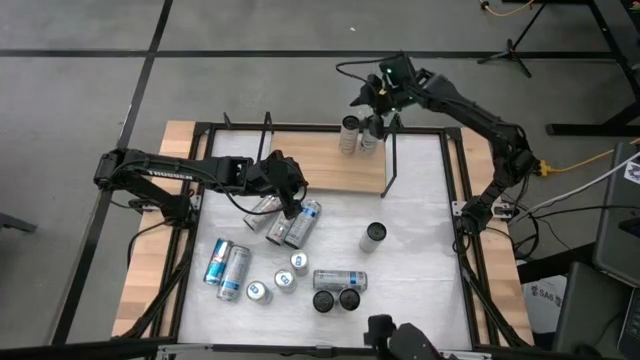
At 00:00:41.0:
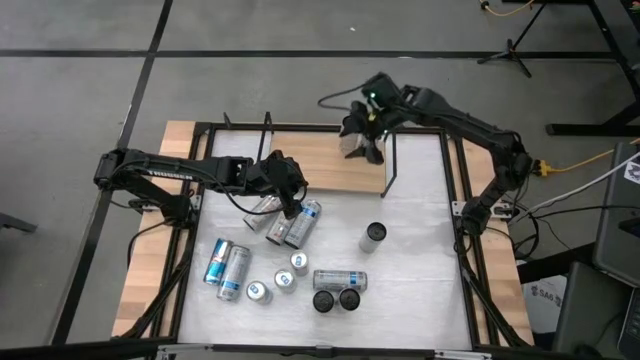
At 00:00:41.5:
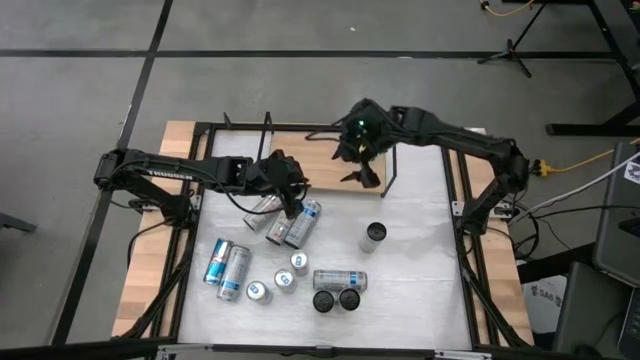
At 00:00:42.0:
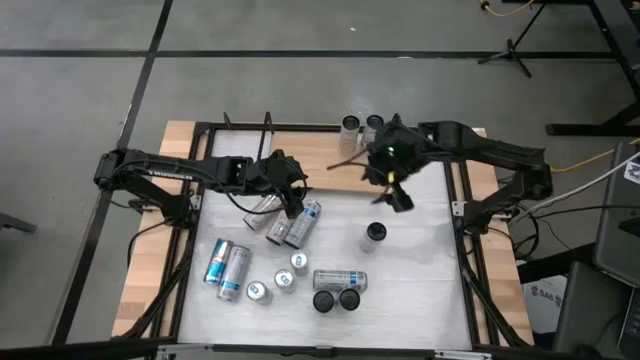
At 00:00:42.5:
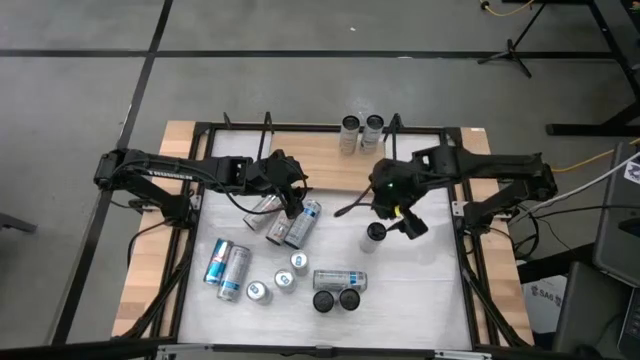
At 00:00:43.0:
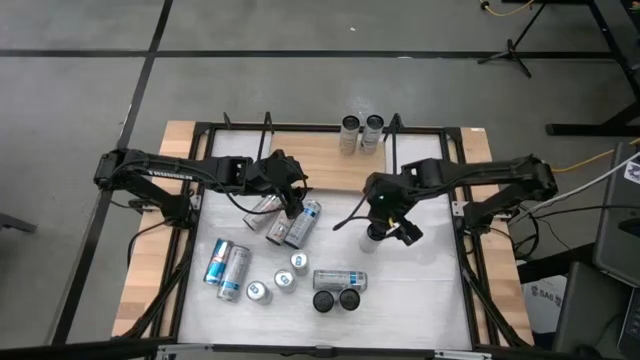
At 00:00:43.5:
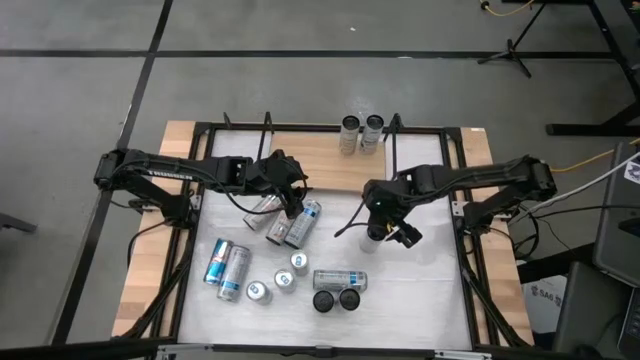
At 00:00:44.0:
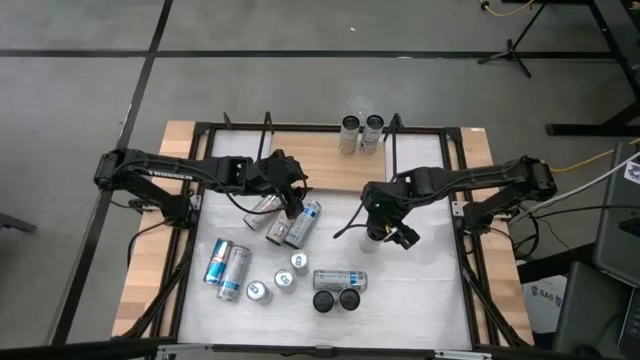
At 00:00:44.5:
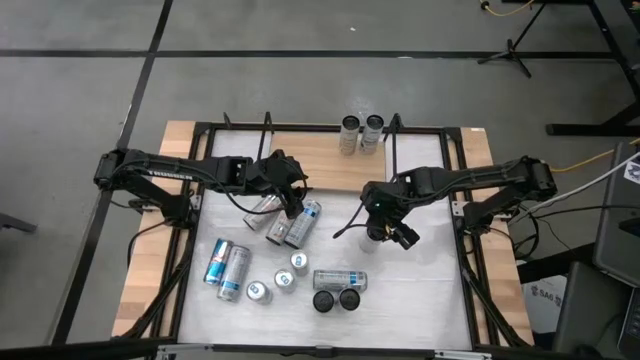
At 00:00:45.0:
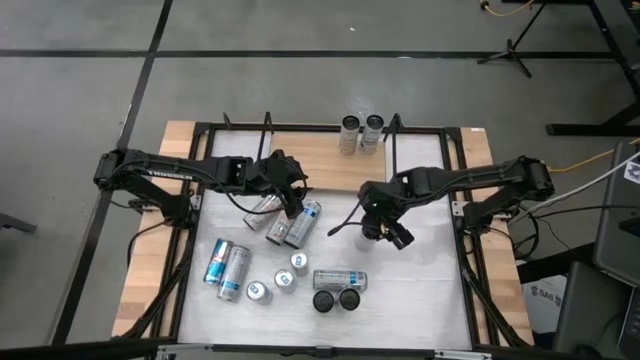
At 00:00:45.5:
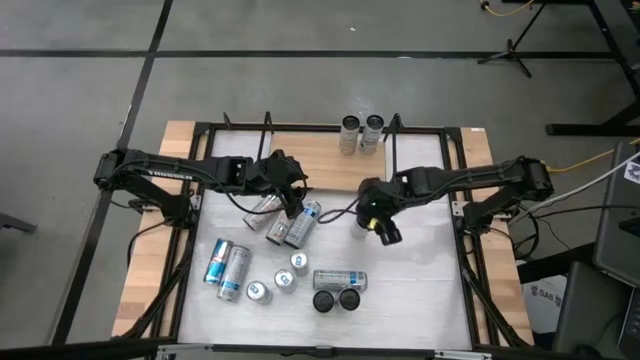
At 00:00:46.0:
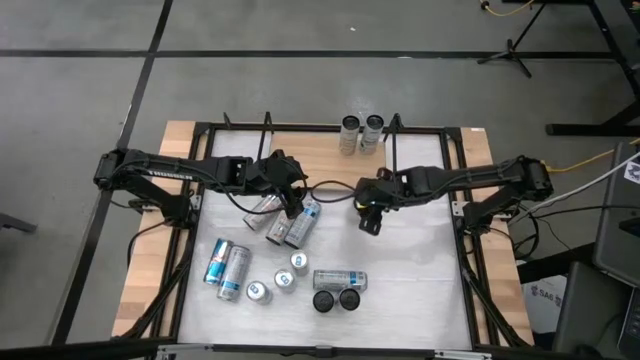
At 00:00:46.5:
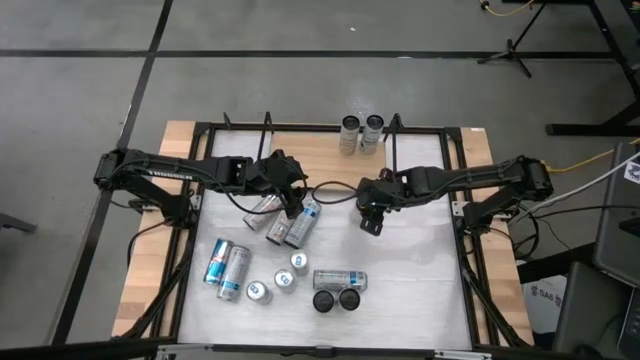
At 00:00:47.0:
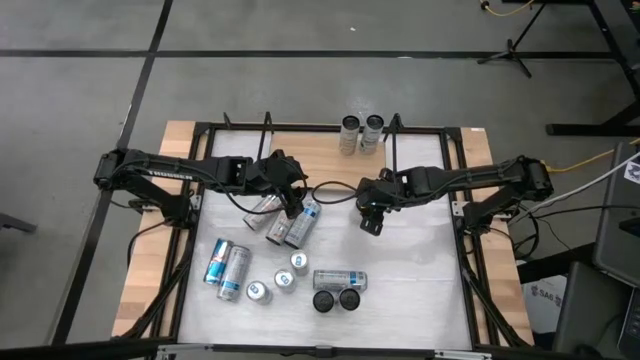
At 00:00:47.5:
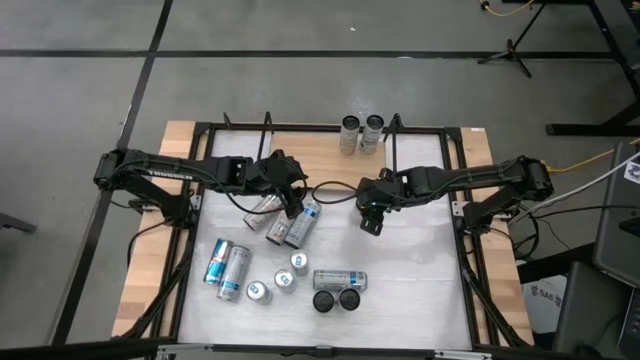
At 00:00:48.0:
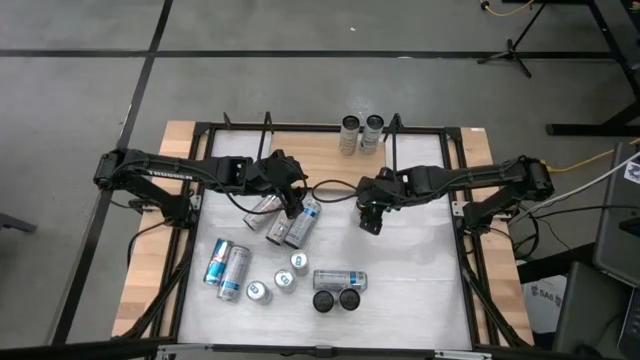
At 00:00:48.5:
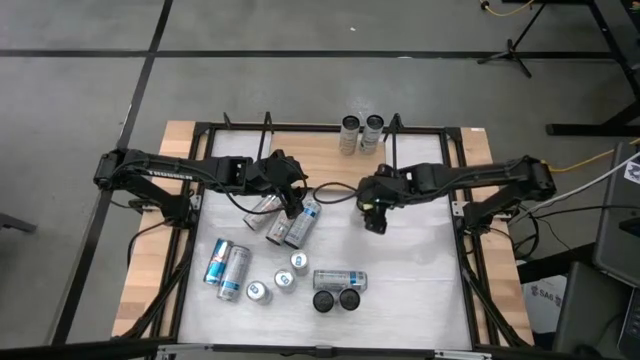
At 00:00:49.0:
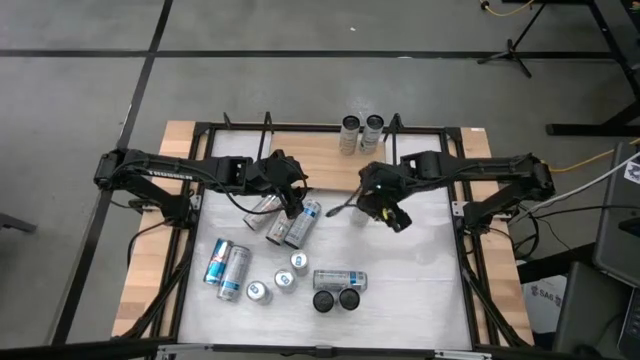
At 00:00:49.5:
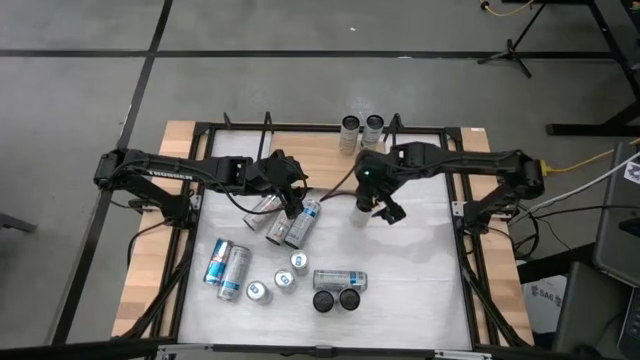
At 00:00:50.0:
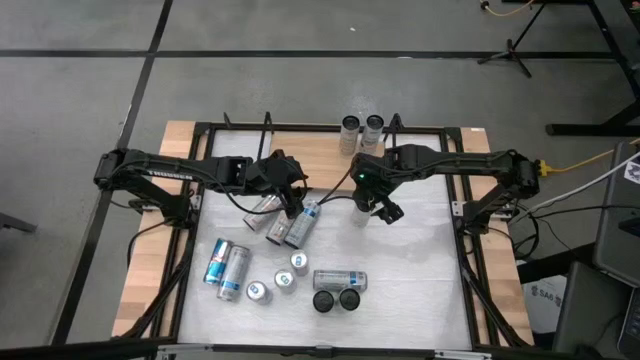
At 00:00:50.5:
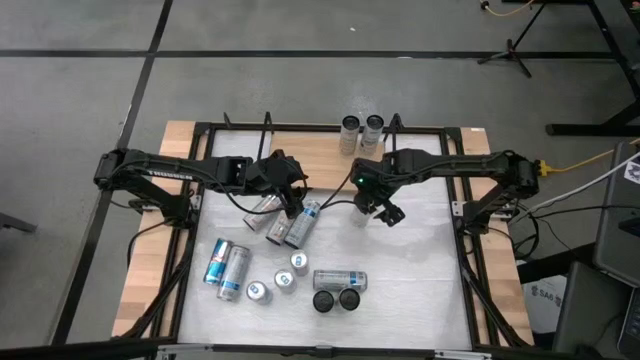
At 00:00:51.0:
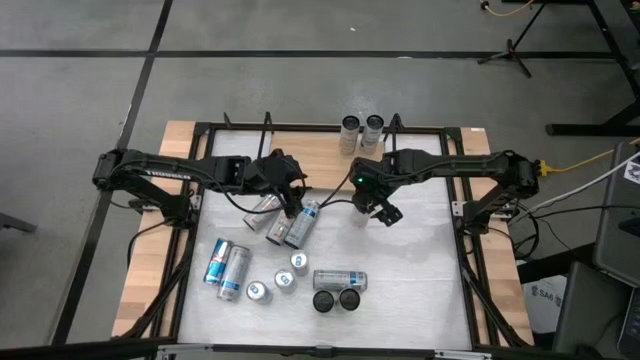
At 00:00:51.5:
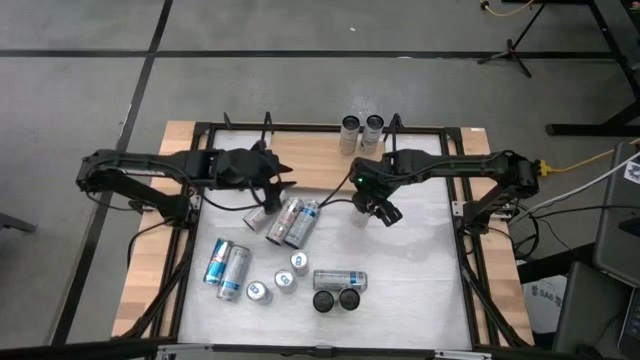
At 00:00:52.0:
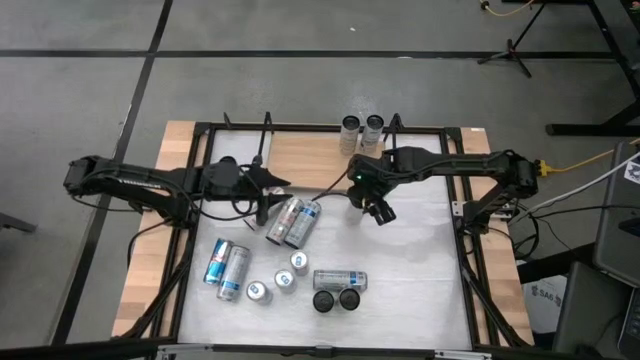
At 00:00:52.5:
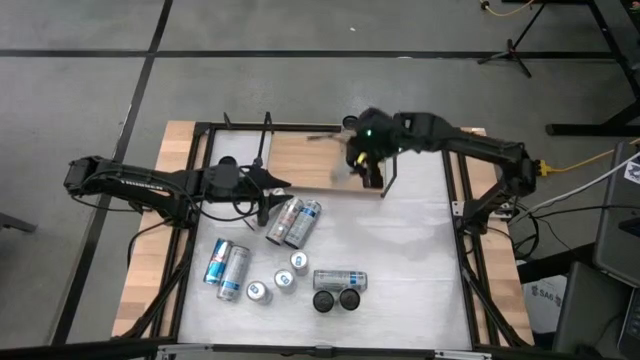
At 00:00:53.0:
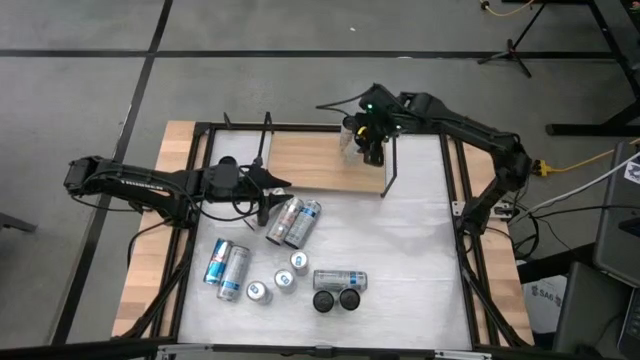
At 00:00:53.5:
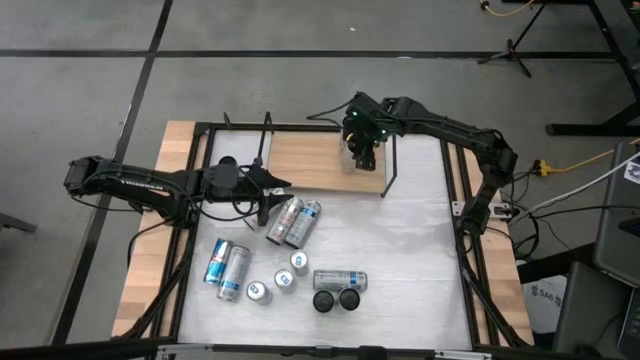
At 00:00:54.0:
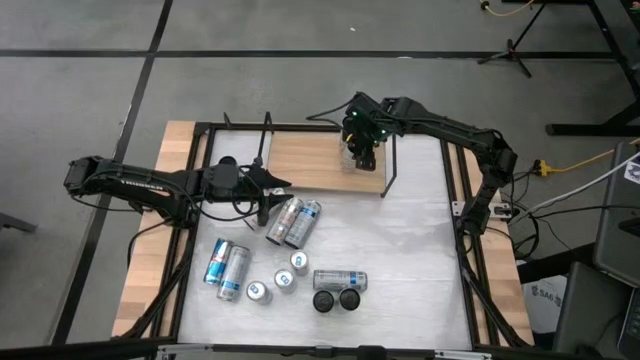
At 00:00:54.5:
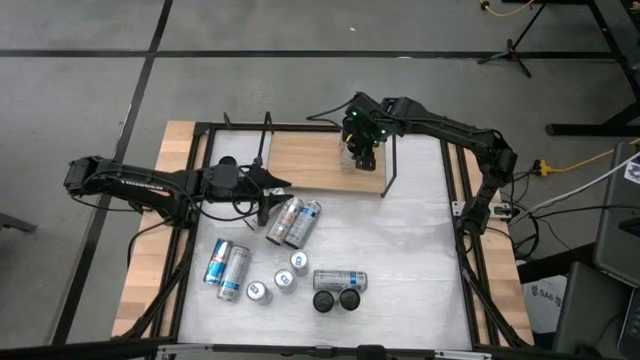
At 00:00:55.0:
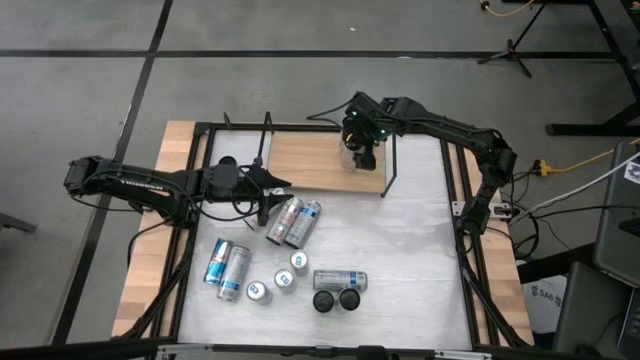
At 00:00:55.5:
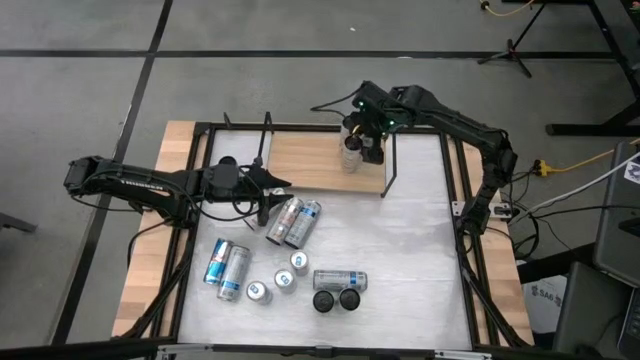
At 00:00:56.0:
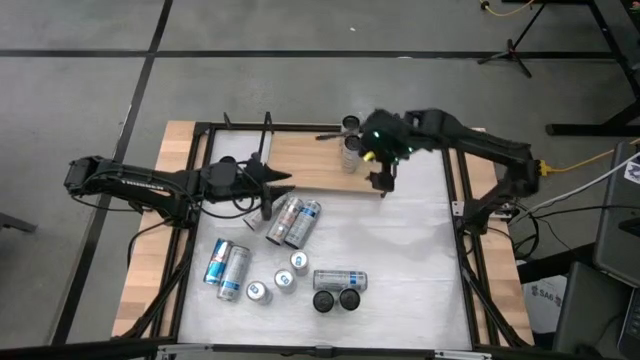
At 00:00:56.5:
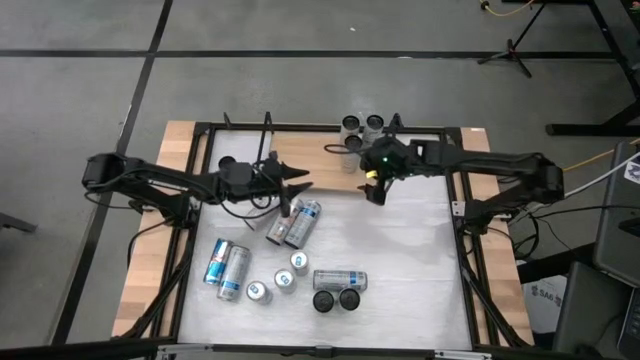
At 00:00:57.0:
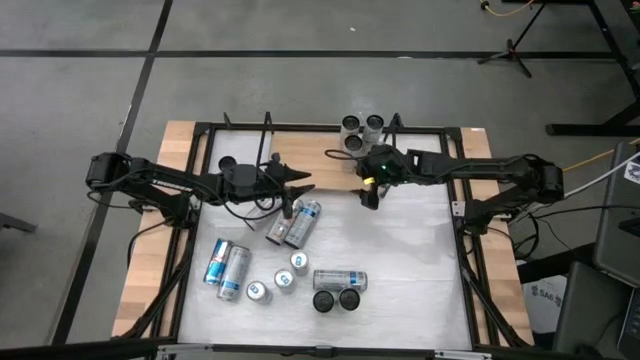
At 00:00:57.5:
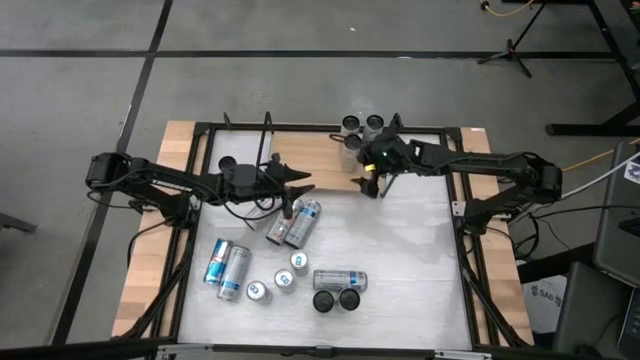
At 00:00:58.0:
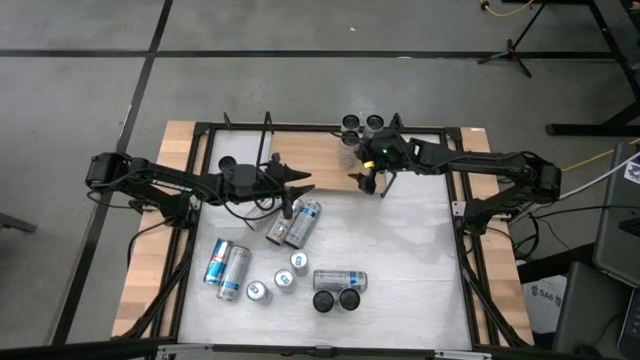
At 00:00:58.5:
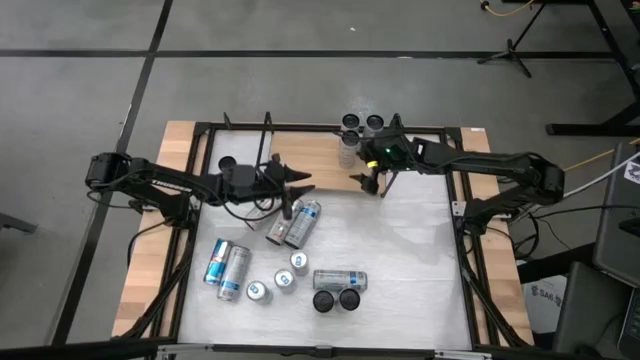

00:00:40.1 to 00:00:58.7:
Task: Place canned beverage on shelf
Put the white soda can aligned with the other white soda can on the shelf

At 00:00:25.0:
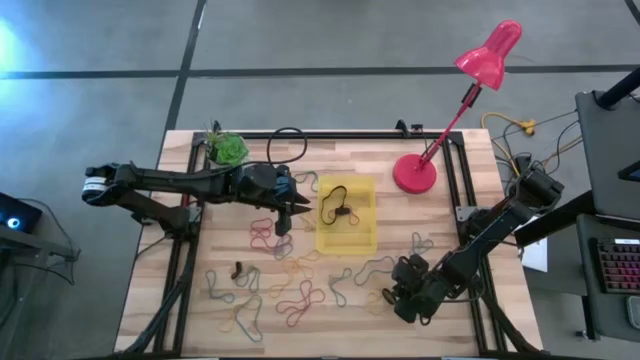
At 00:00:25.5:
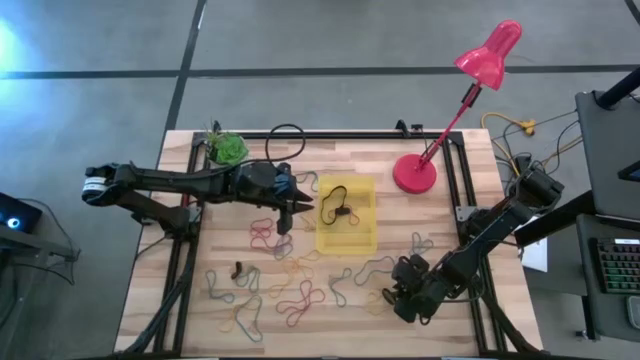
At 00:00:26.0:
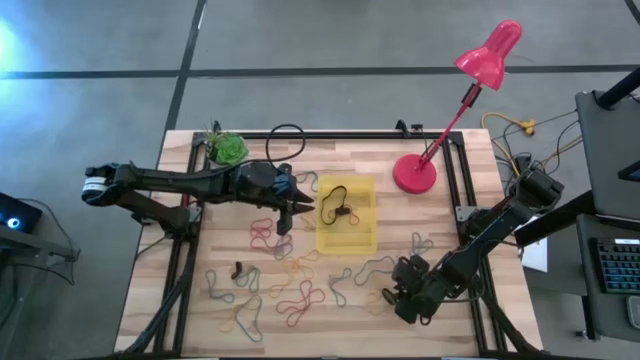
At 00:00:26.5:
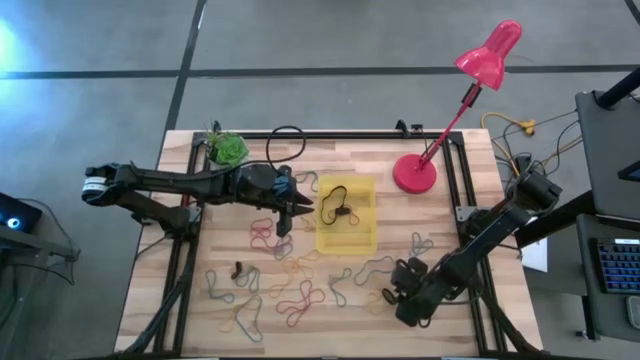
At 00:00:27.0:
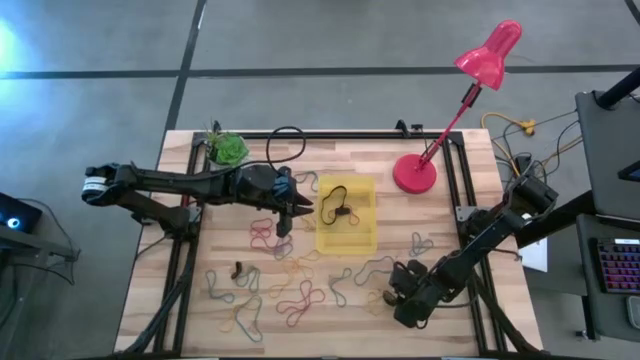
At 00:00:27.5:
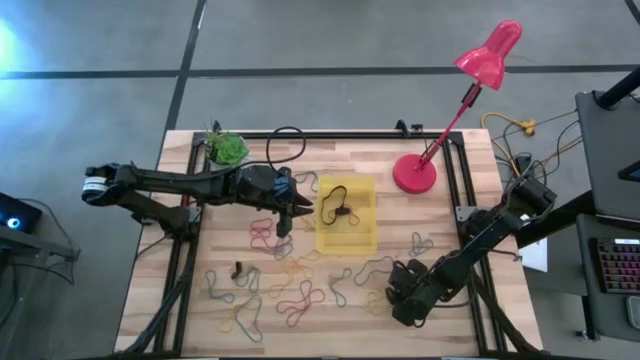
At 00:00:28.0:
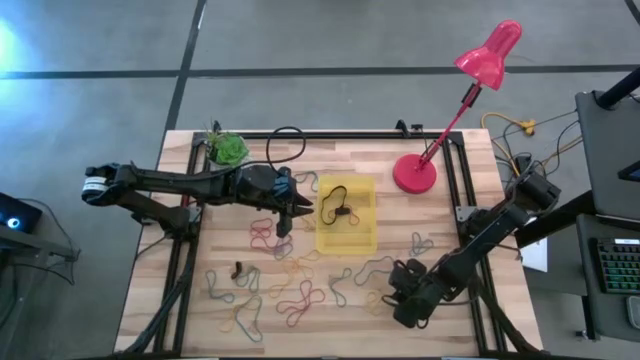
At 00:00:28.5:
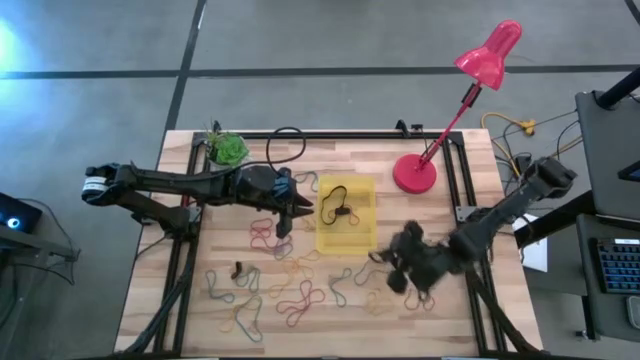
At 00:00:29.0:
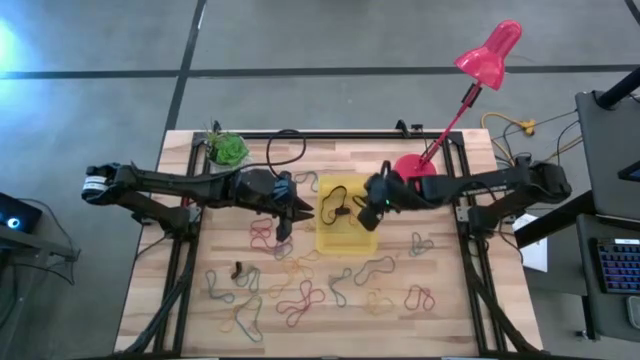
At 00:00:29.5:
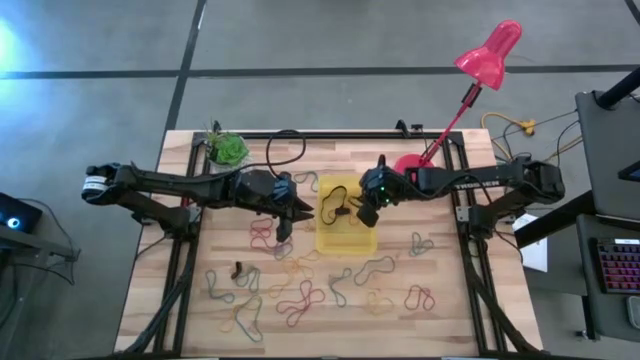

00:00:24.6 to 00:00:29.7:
Task: Pick and place rubber bands into bin
Put the right black rubber band into the bin
